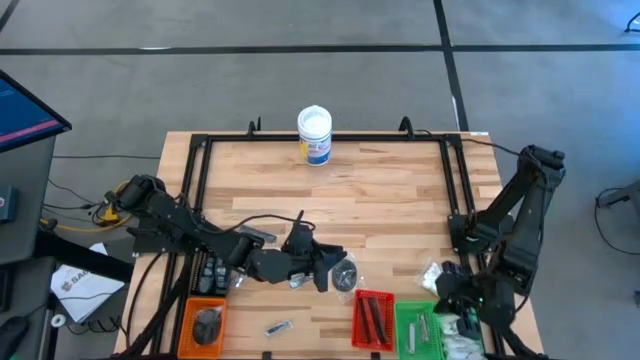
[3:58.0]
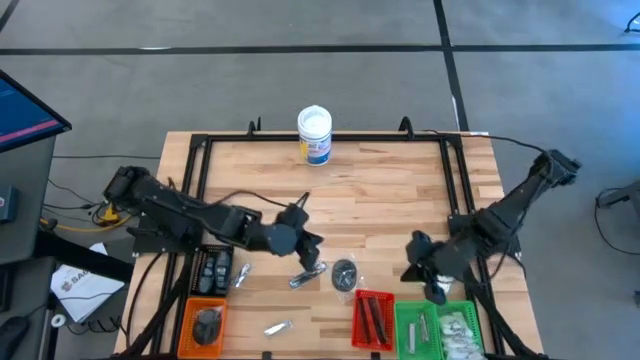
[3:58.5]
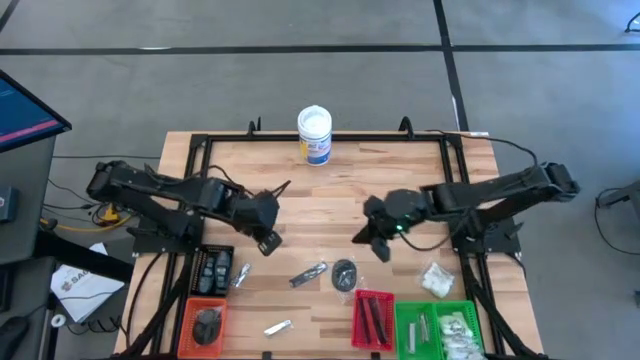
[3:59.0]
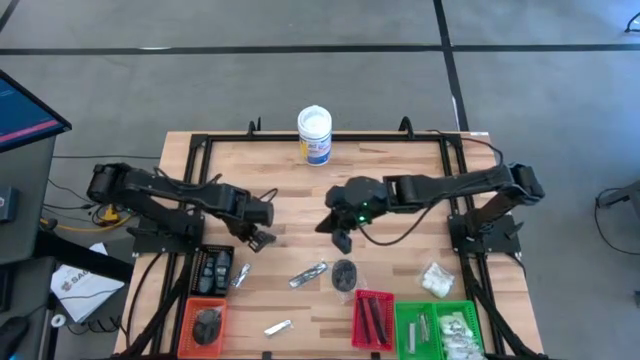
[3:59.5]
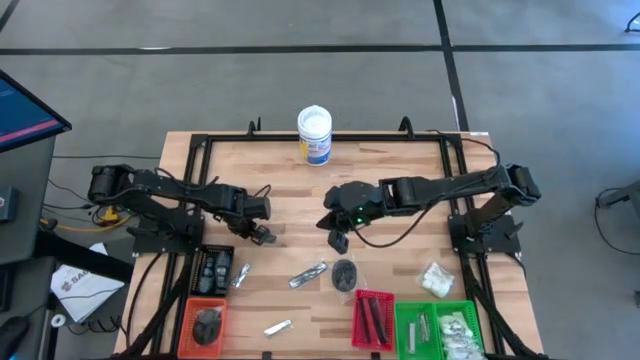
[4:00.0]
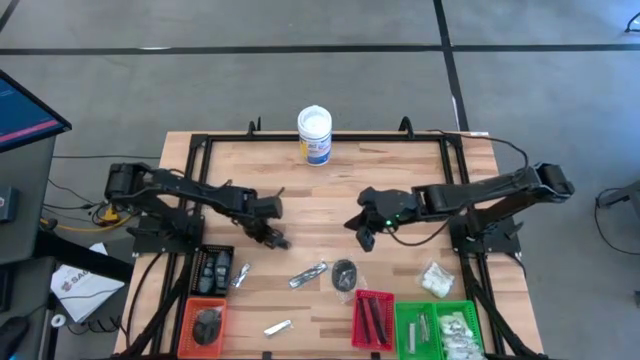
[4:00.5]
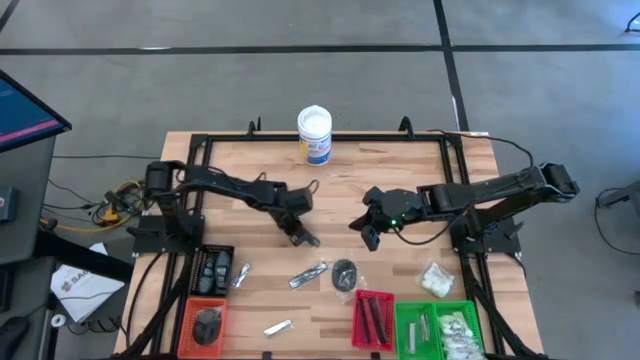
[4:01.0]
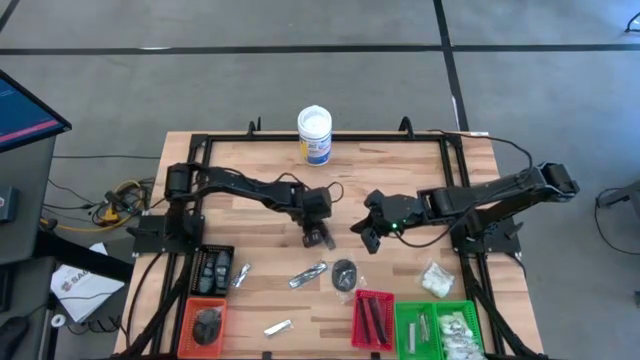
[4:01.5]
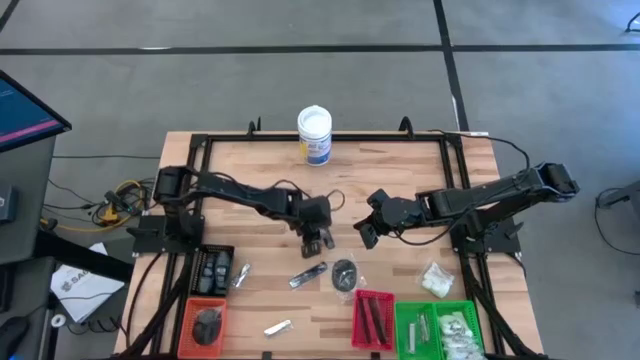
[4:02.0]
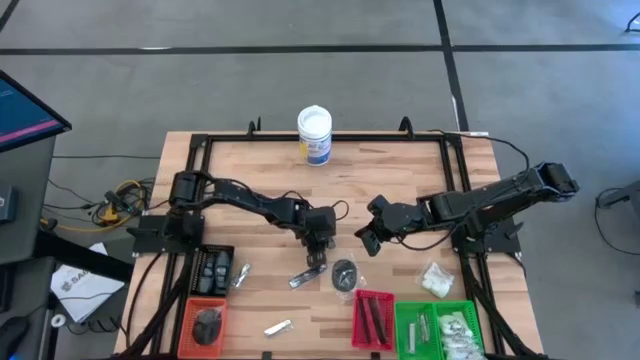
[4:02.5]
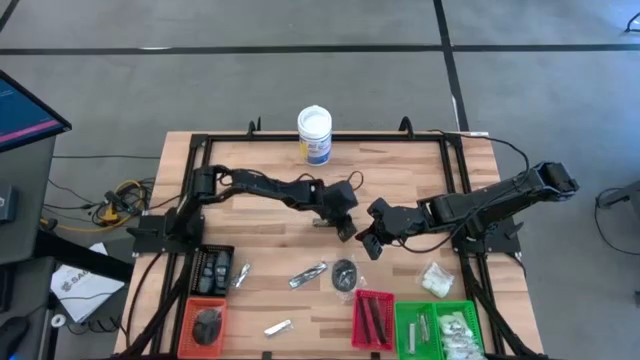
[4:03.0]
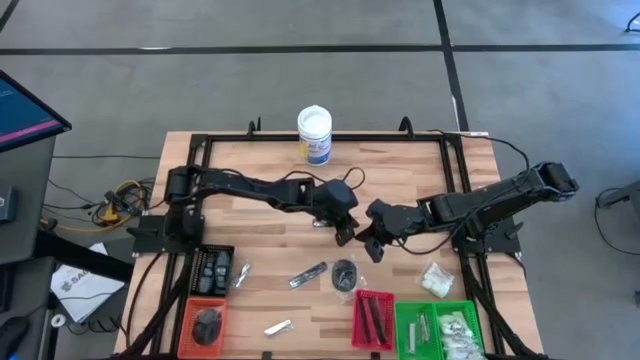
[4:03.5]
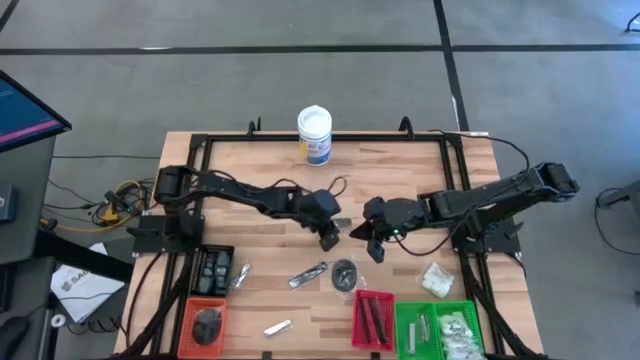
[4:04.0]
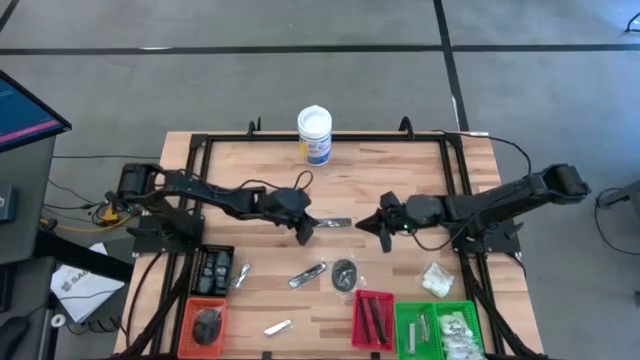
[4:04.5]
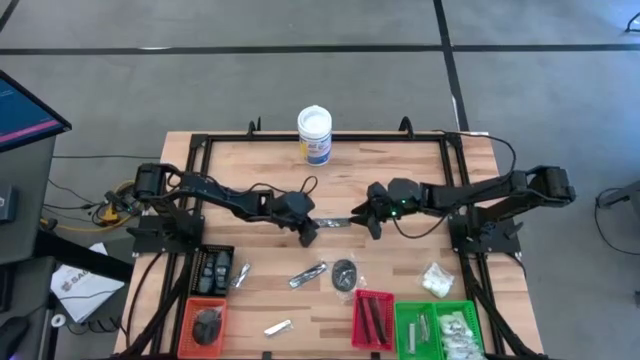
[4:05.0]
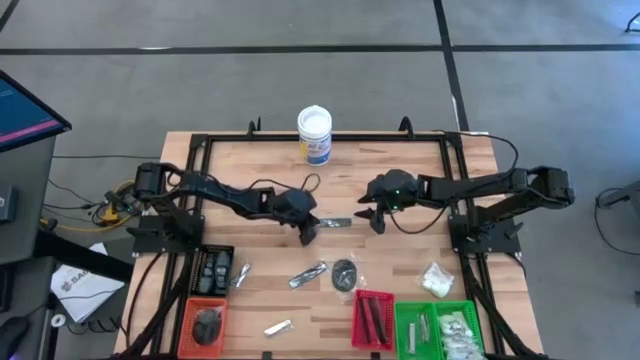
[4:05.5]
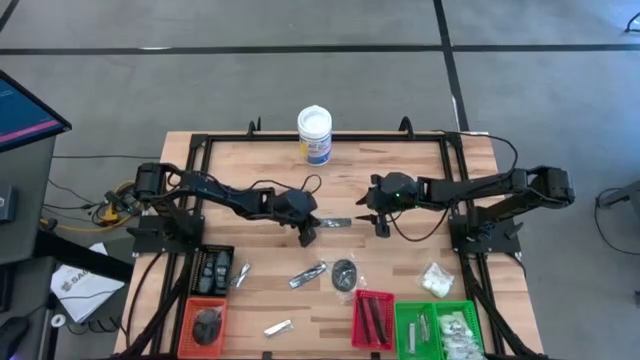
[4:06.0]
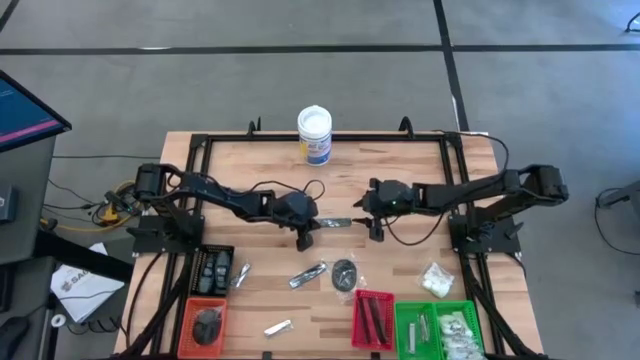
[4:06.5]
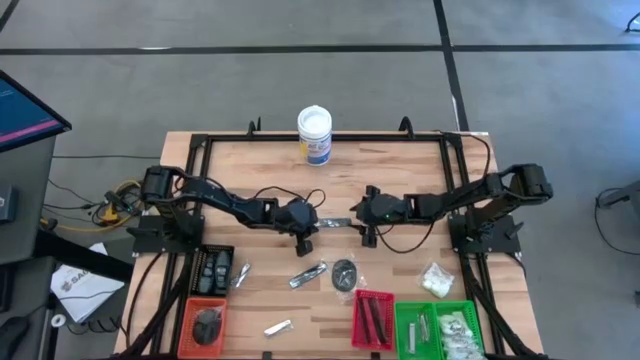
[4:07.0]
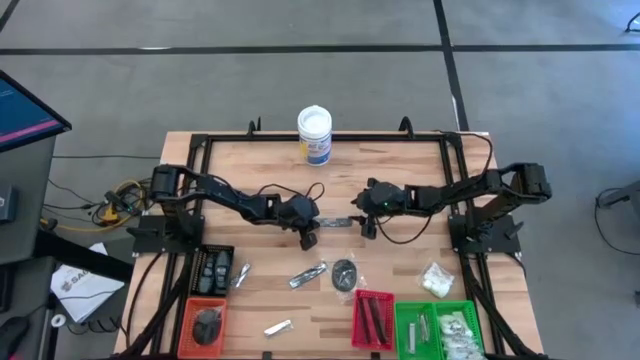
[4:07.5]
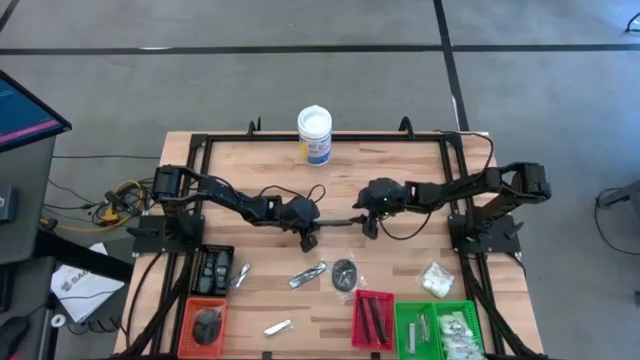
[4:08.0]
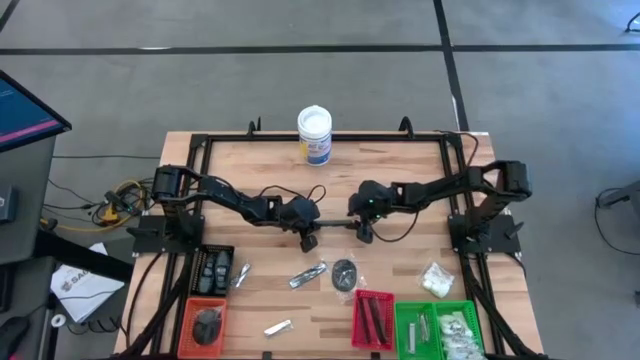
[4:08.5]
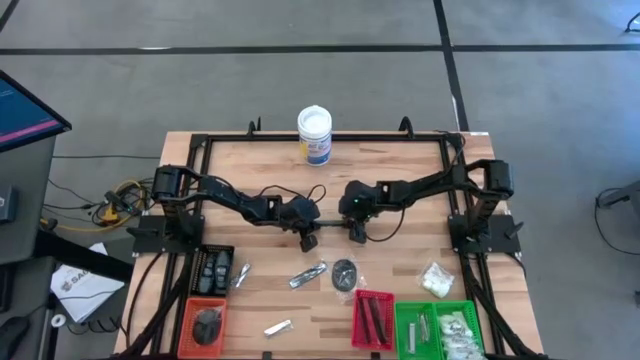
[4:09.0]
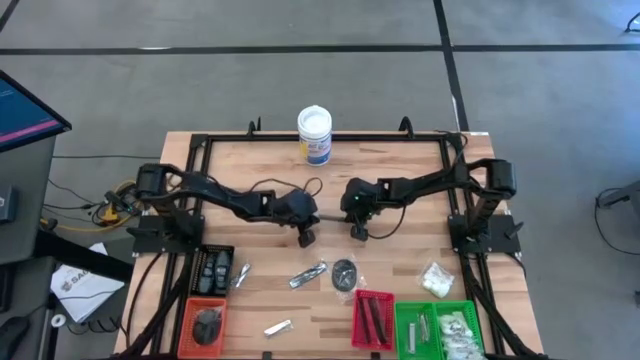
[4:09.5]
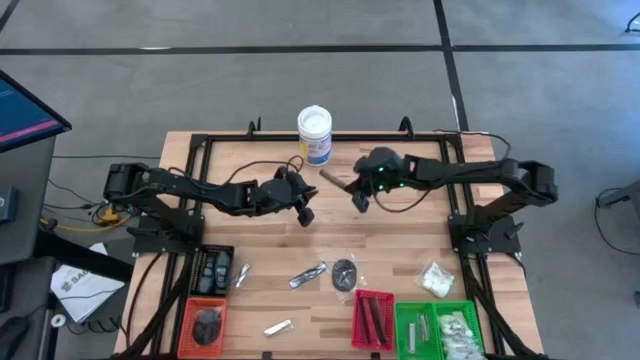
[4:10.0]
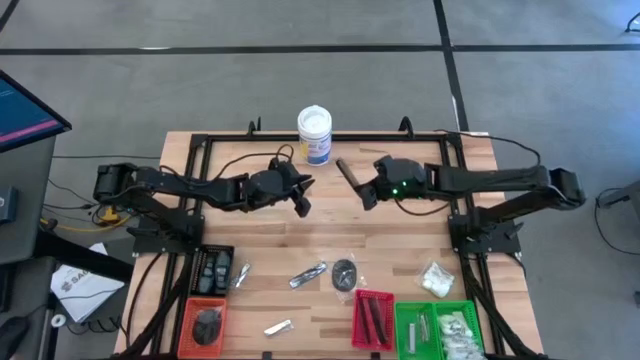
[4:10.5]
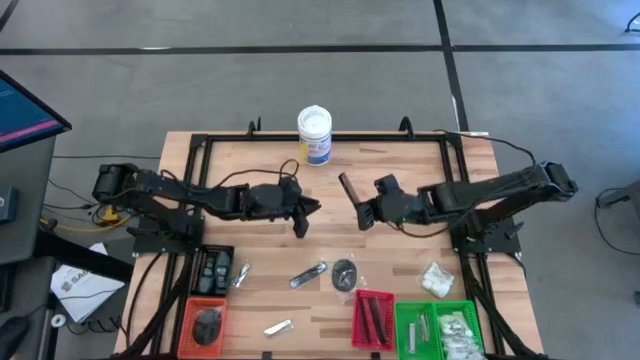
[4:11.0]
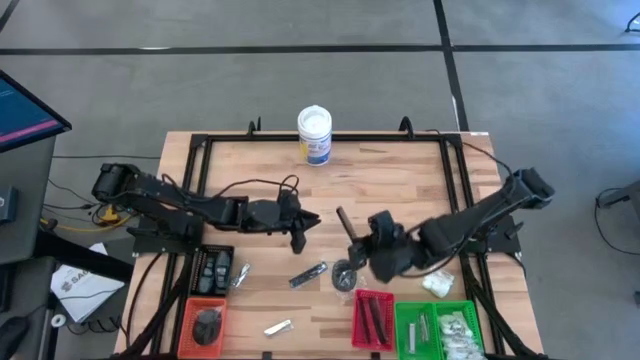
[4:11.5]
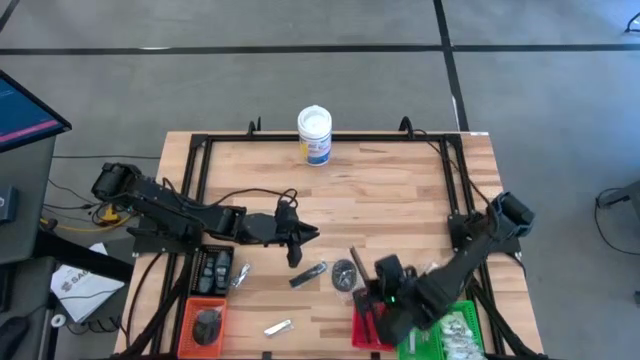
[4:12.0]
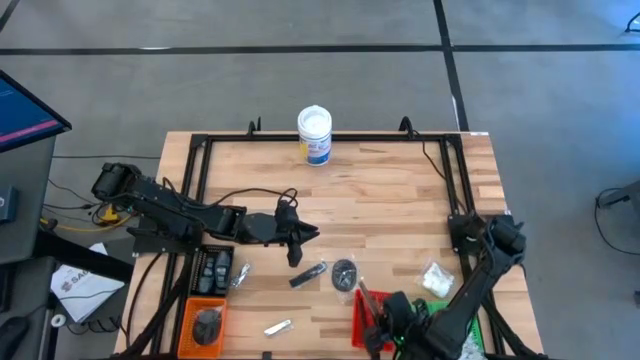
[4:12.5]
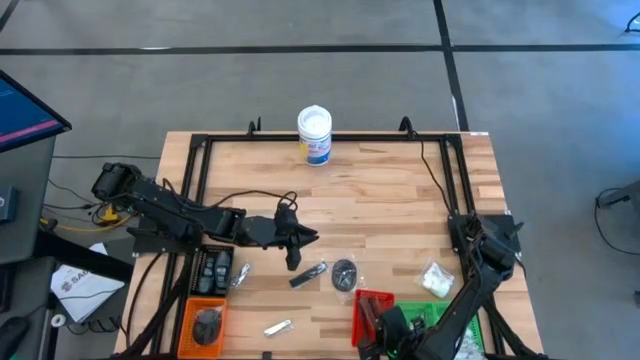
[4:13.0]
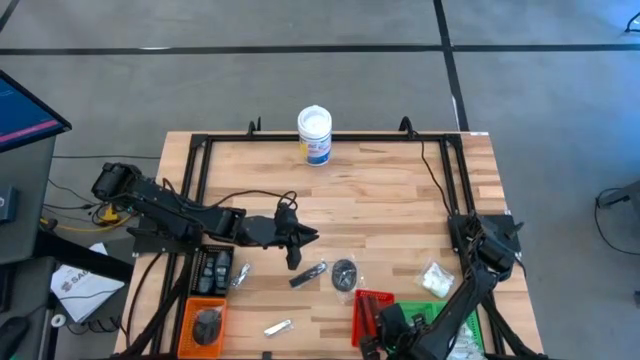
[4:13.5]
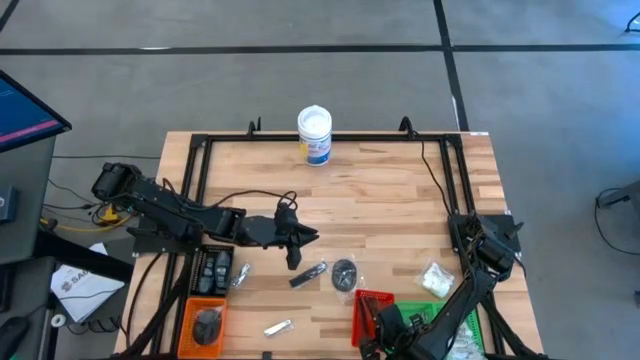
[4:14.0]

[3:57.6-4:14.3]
Task: Pick & Place Travel size toiletries
Put the black comb into the red bin

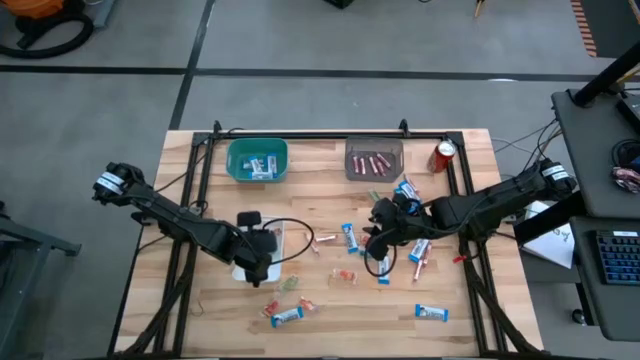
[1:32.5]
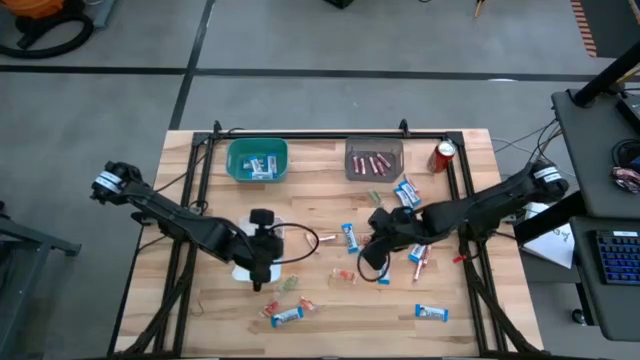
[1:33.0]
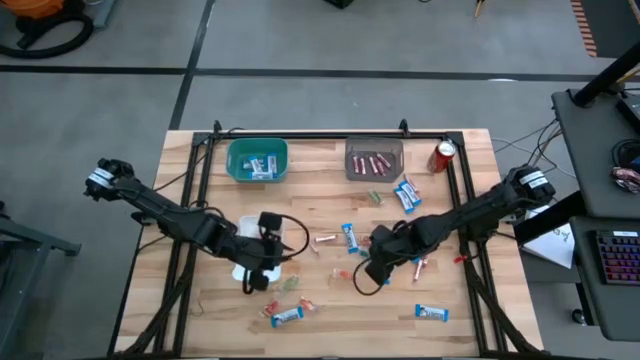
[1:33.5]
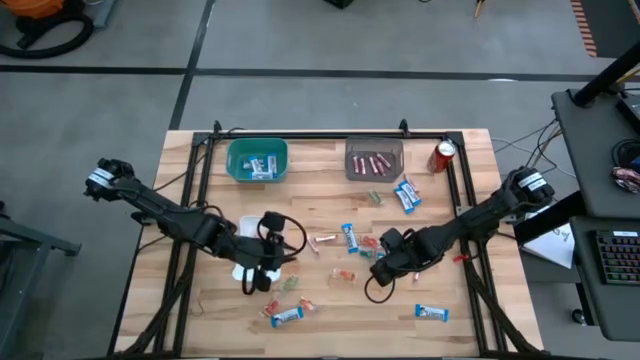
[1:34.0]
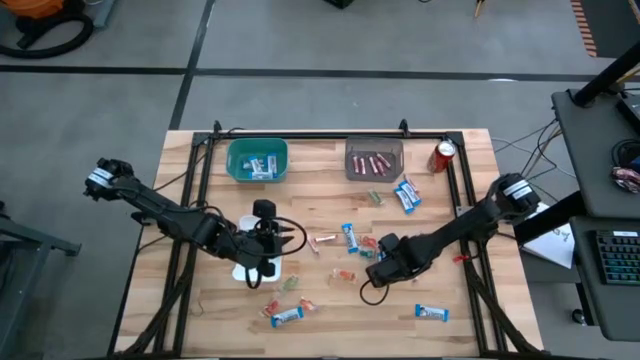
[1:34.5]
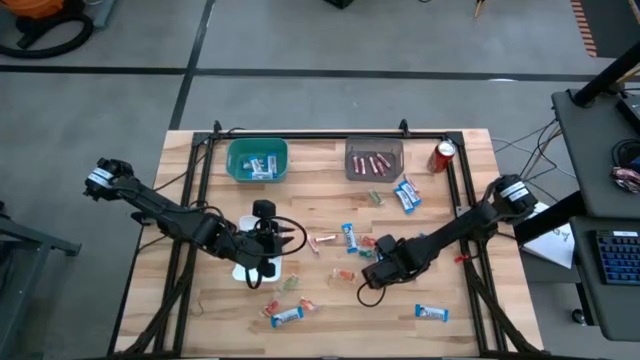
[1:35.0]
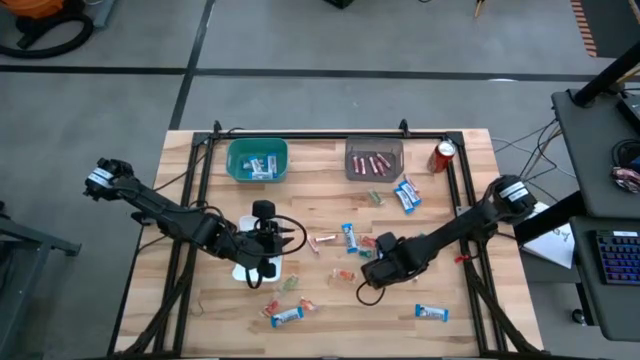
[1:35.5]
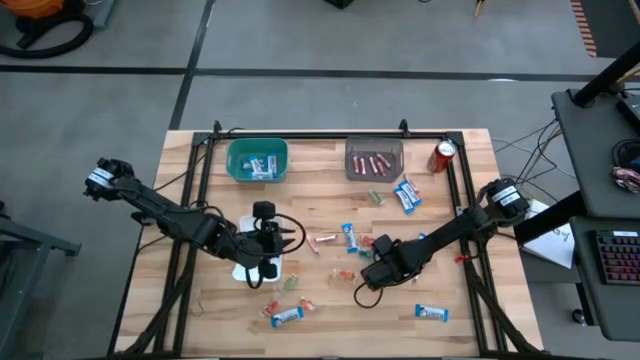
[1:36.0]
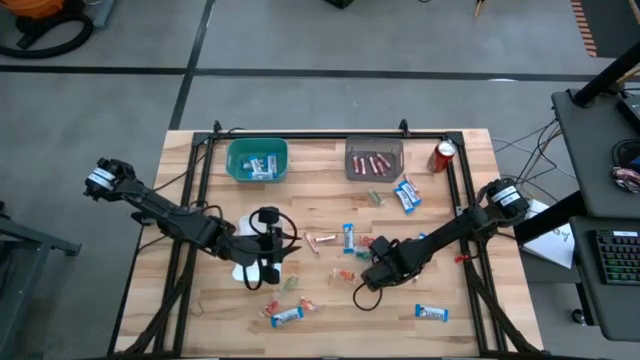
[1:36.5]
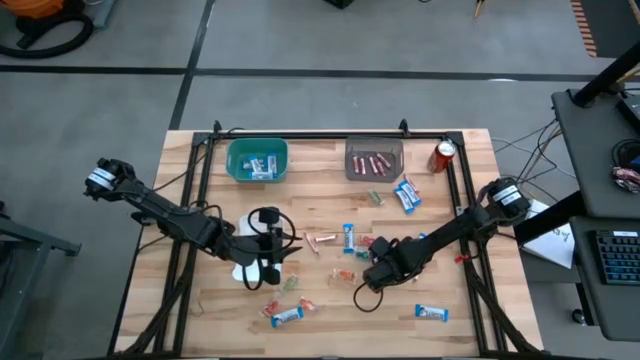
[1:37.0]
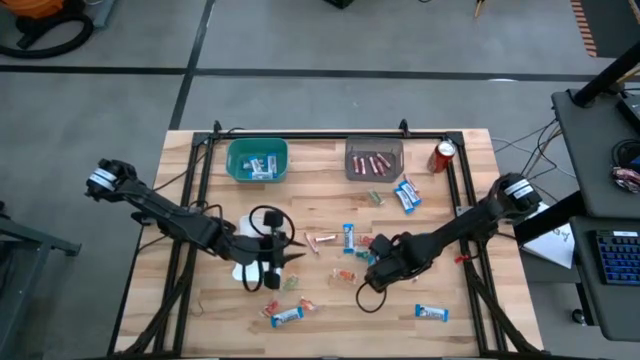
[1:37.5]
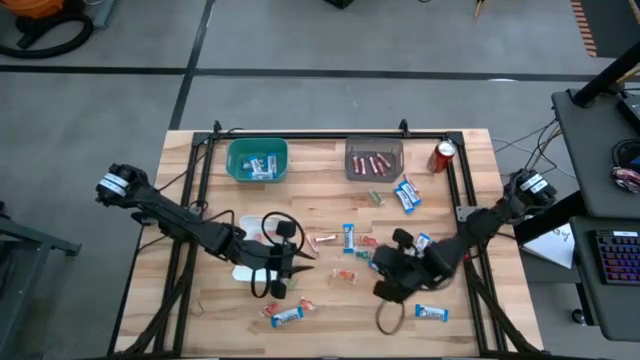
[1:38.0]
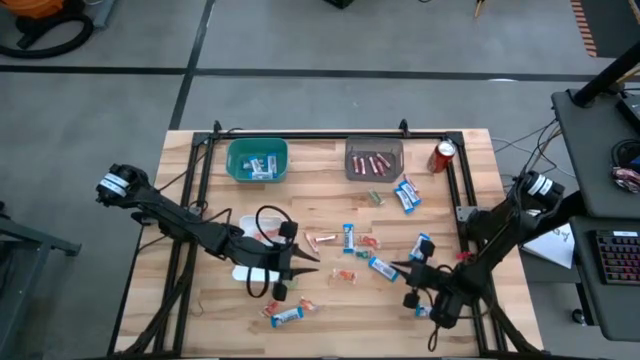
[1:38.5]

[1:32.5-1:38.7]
Task: Sort candy
Put the white chocolate bar into the green bin
